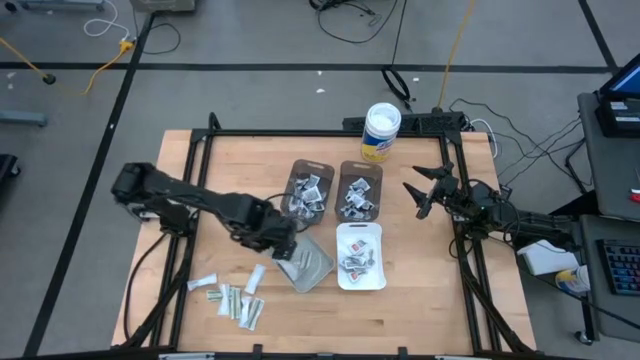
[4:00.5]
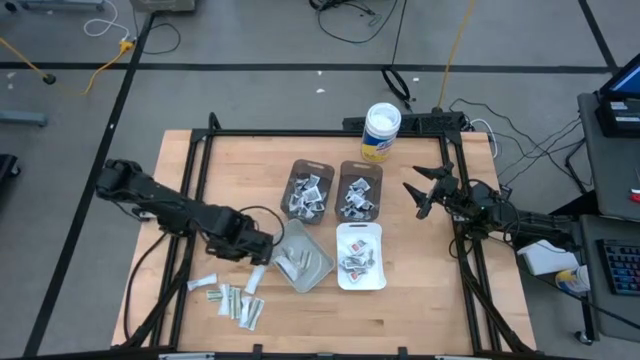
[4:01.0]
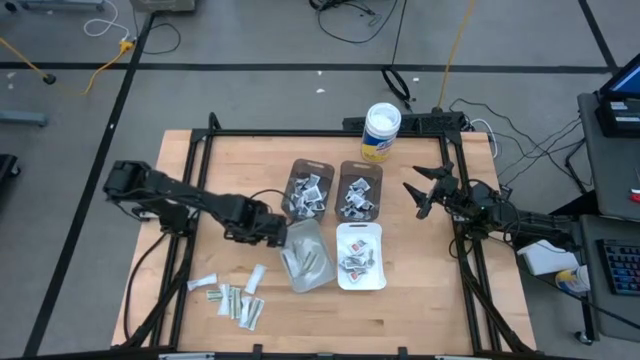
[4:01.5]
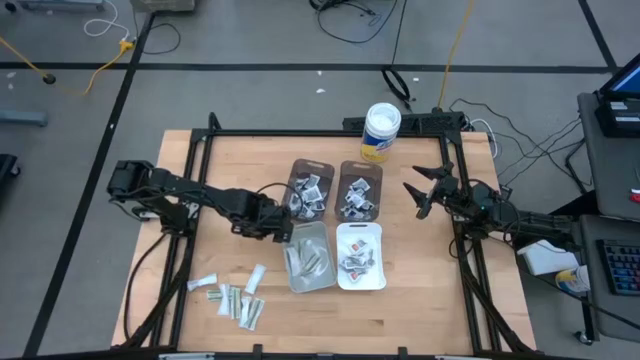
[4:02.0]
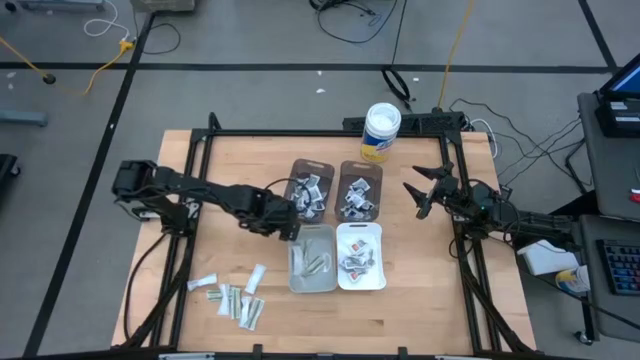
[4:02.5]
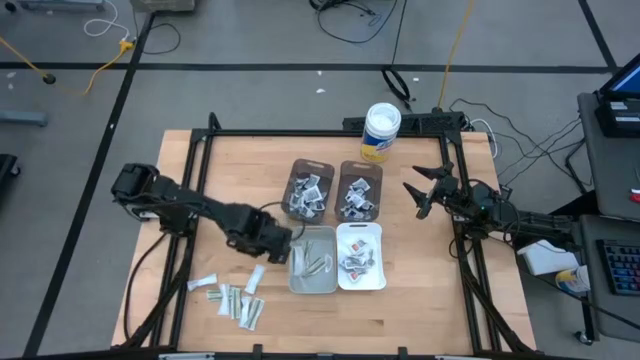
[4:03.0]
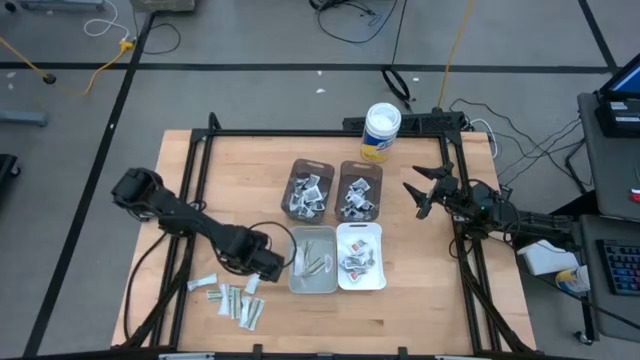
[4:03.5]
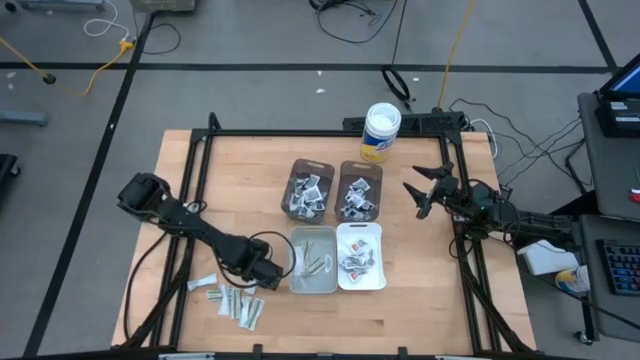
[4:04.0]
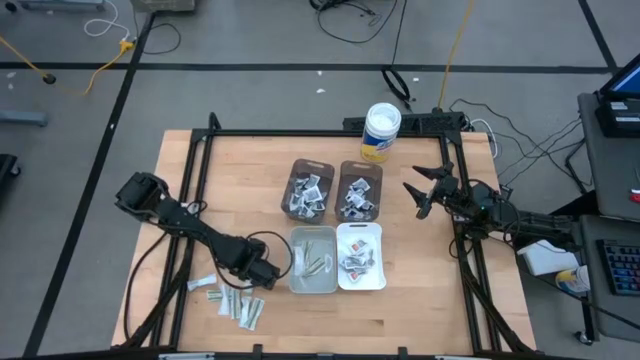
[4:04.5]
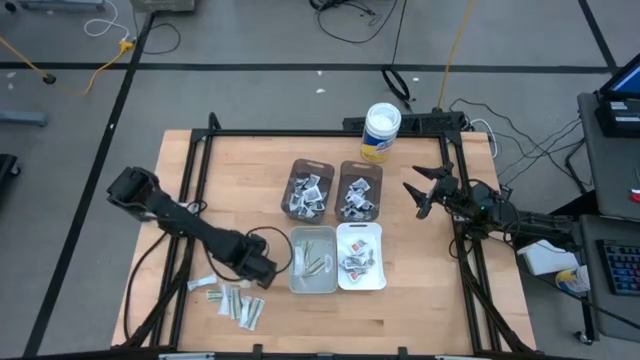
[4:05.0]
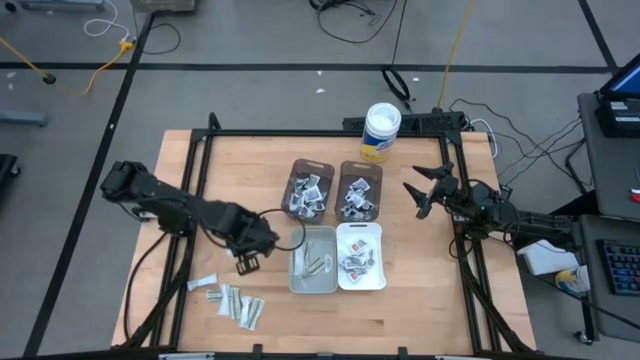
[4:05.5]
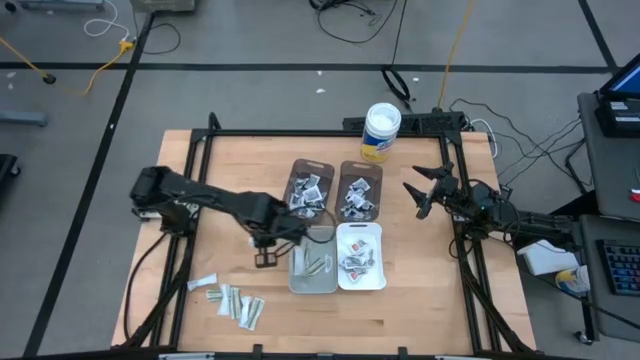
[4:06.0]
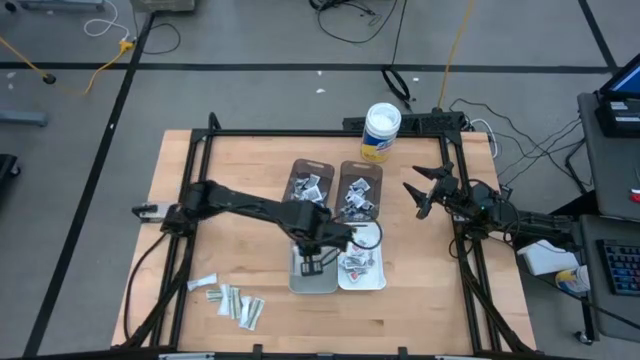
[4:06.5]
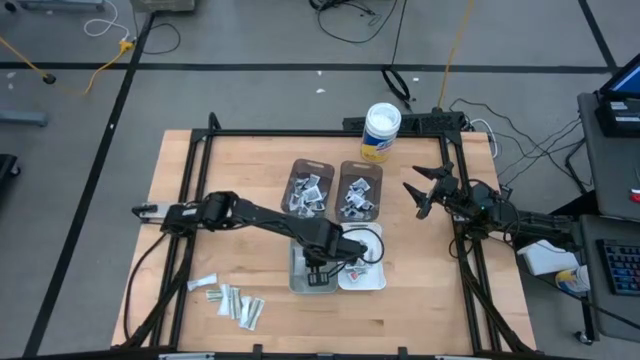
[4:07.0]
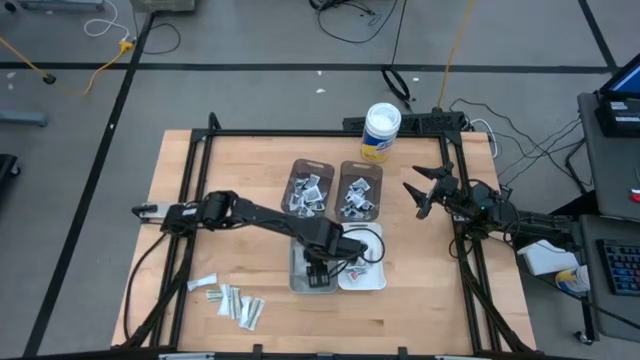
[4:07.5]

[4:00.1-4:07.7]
Task: Pick & Place First Aid Supplies
Put the green pad the gray bin

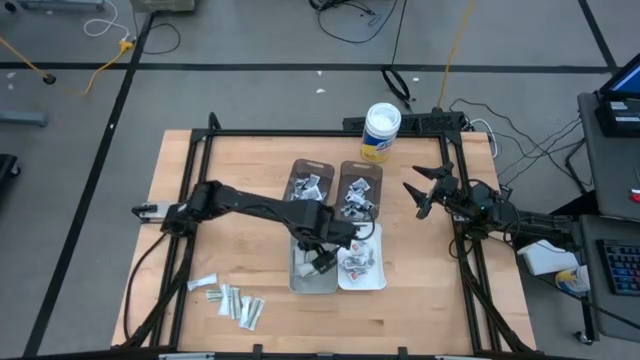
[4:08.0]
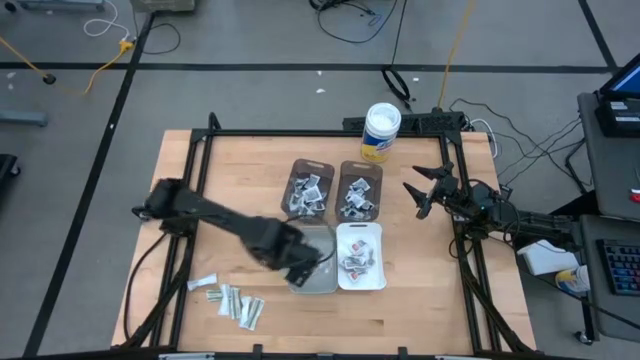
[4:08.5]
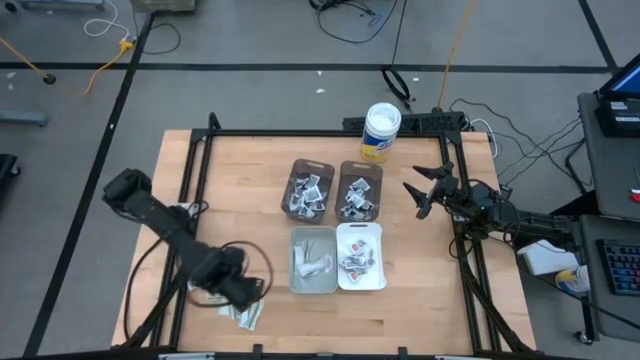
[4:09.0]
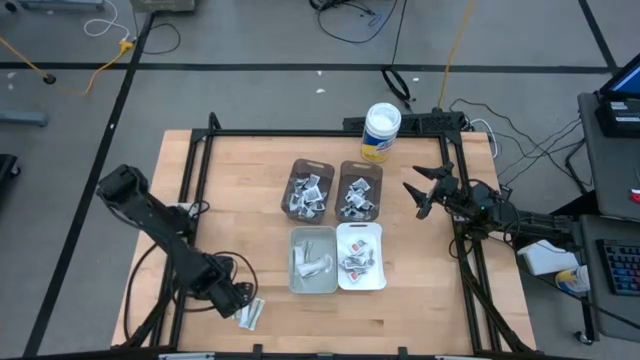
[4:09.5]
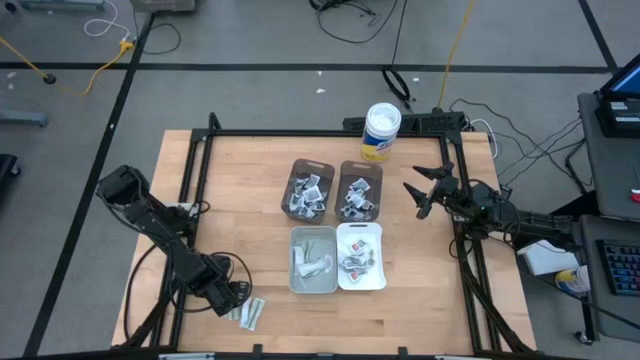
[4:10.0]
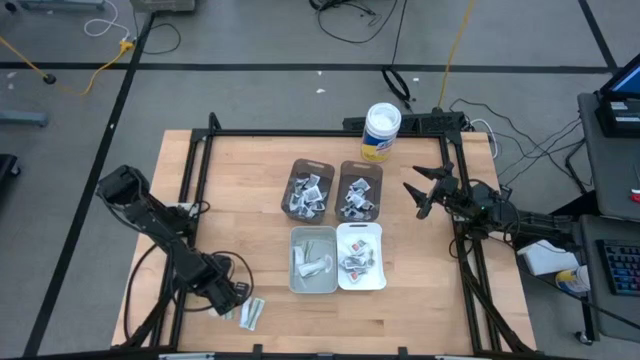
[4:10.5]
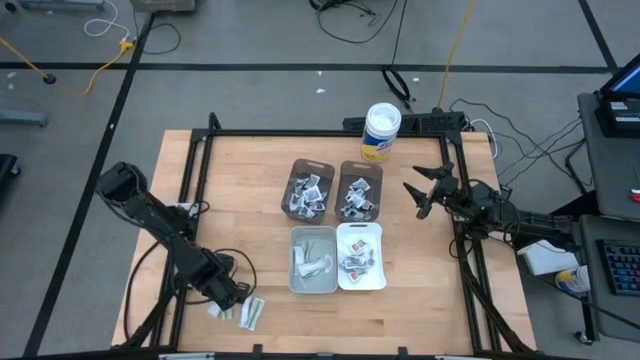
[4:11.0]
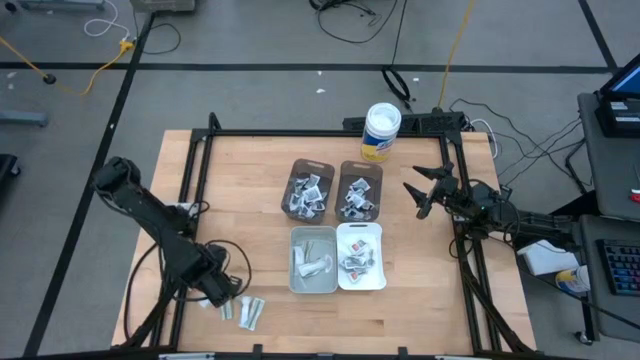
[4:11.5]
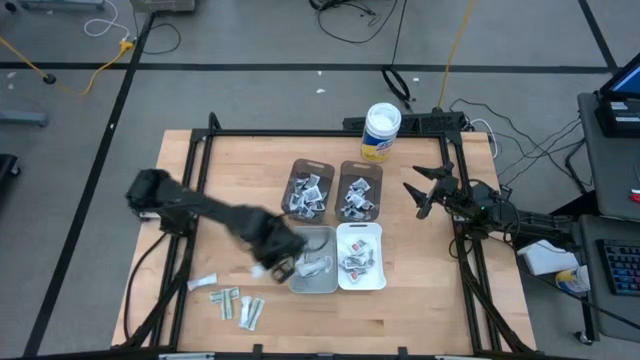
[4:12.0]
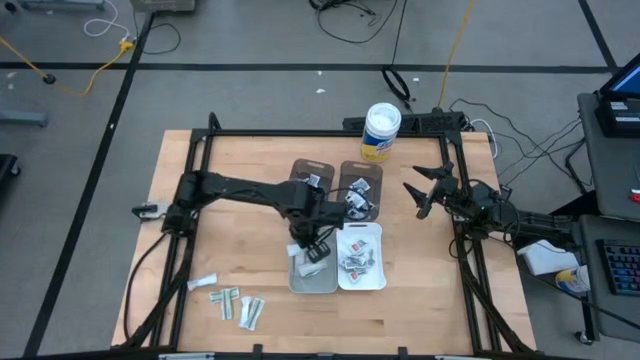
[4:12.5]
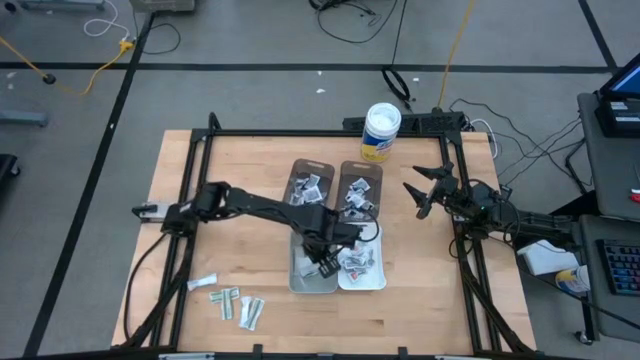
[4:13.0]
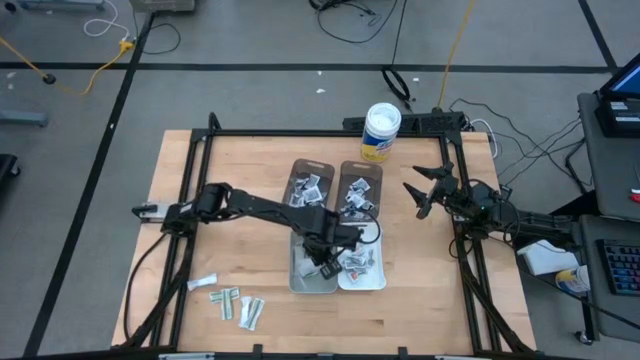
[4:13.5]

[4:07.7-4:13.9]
Put the green pad into the gray bin

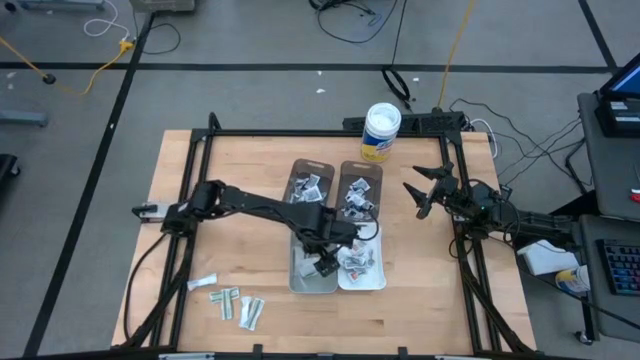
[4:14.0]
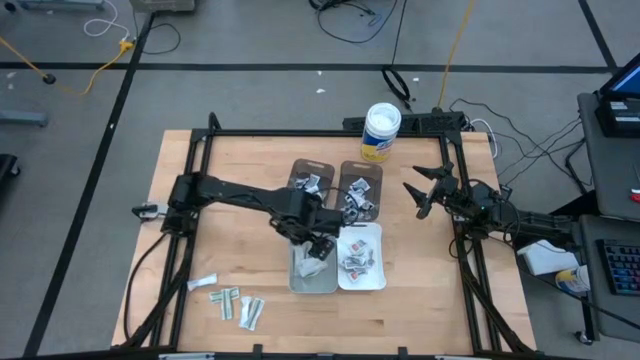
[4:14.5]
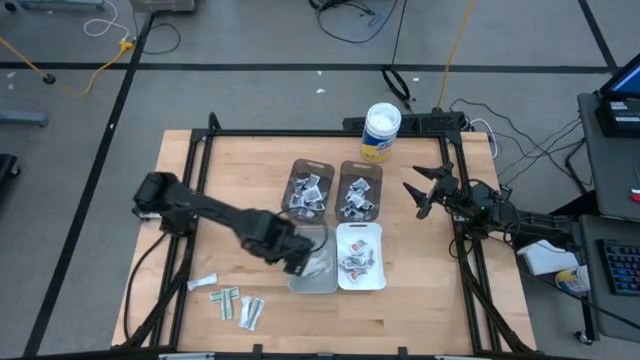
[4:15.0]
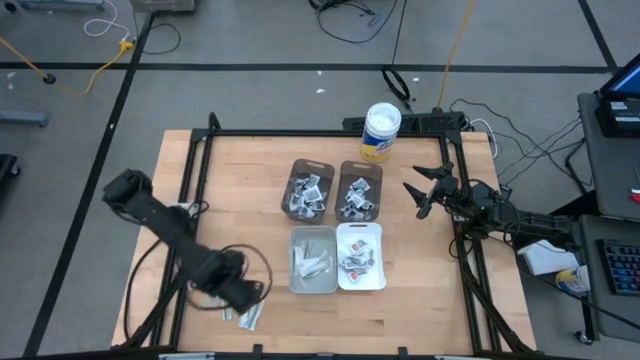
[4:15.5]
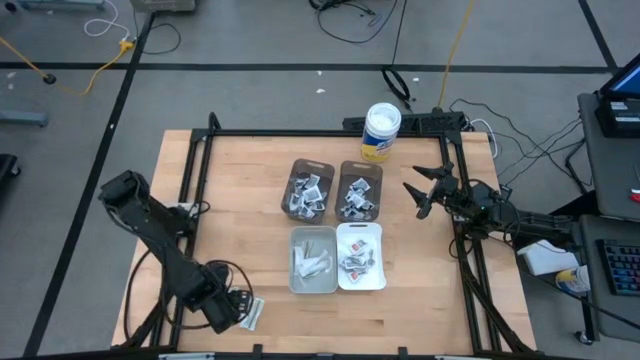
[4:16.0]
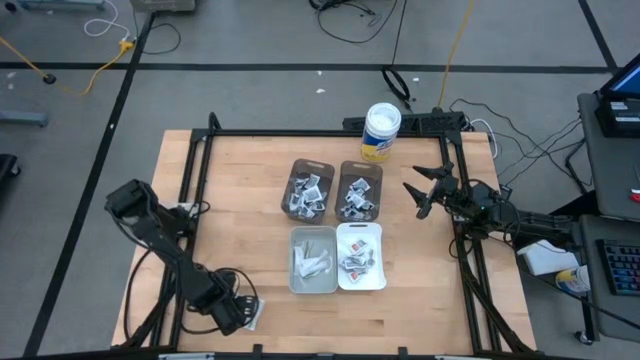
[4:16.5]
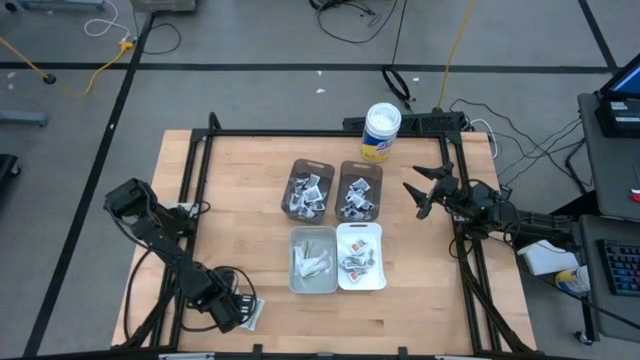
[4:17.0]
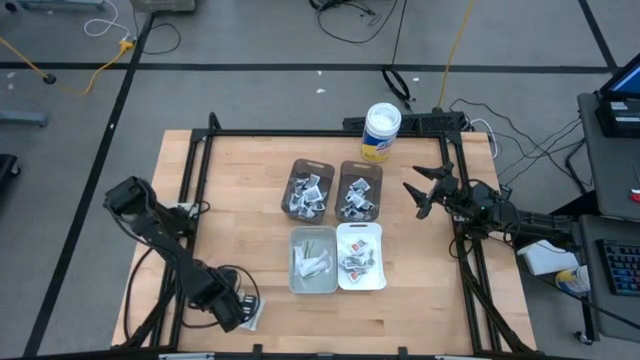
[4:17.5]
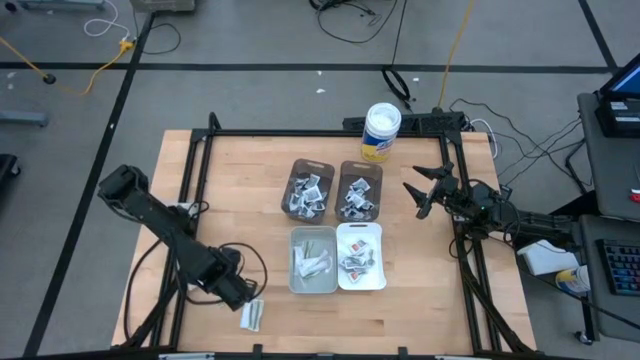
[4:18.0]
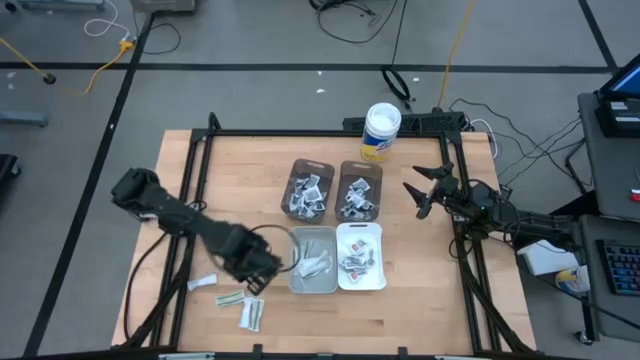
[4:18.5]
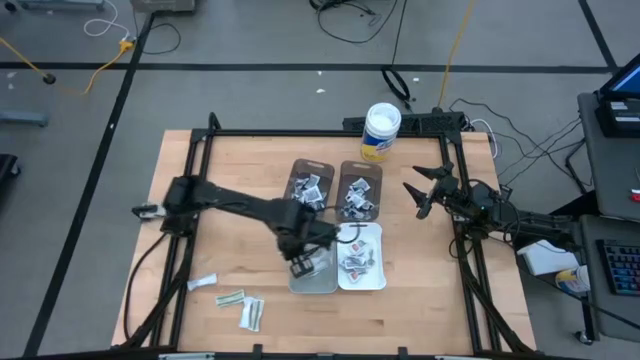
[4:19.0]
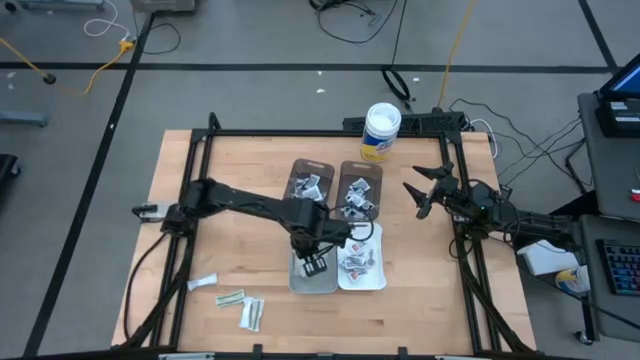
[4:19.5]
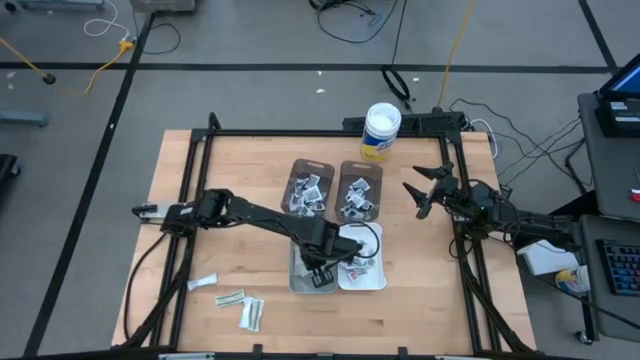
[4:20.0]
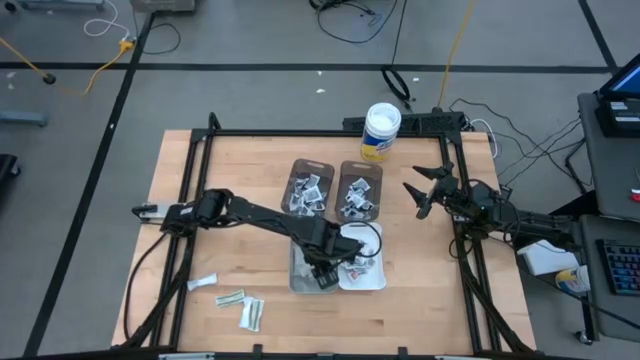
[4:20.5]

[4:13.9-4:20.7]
Put the green pad into the gray bin

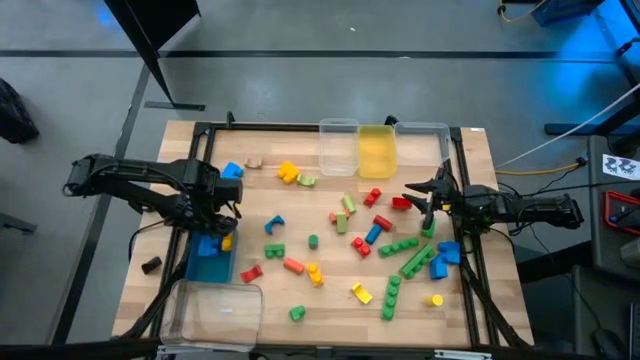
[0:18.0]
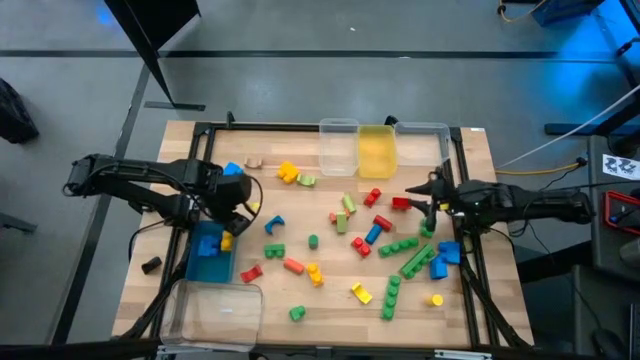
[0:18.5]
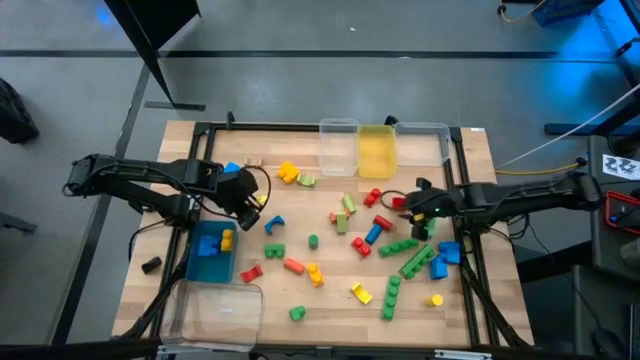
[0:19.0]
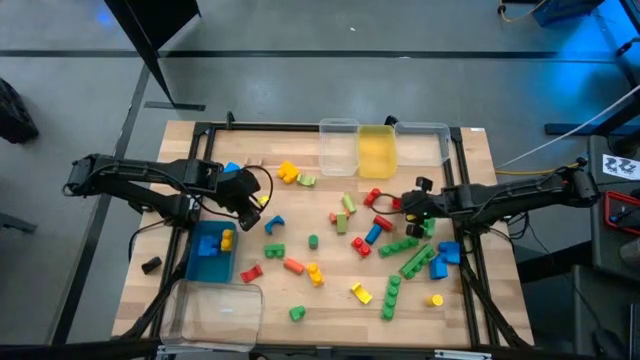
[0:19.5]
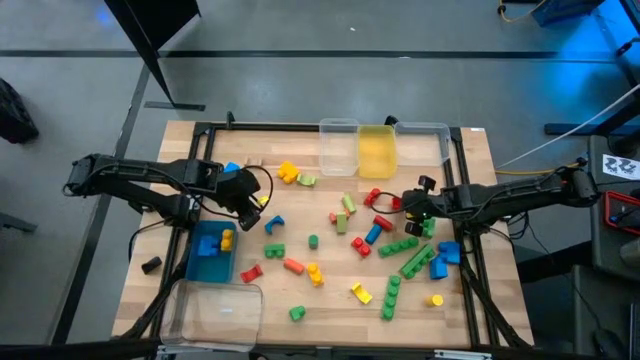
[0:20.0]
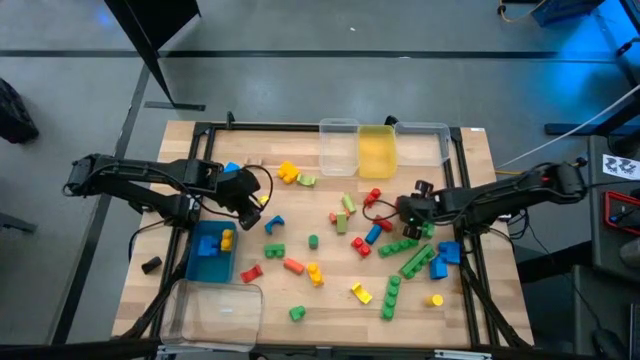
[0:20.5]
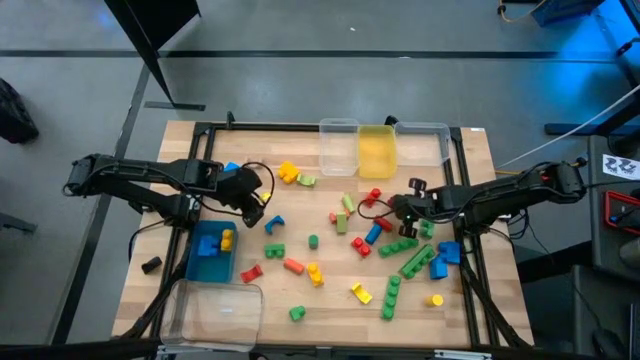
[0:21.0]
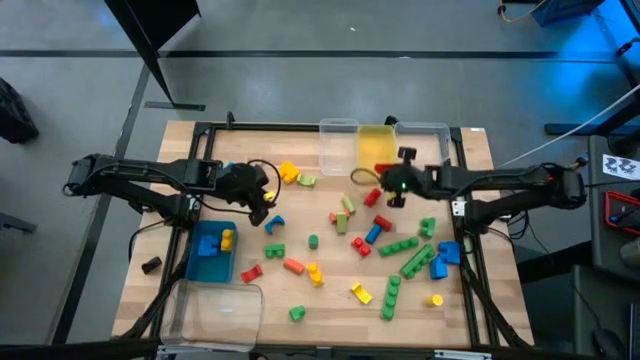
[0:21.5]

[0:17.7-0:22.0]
Task: Sort blocks by size
Put the red 2 stud game piece into the yellow bin
